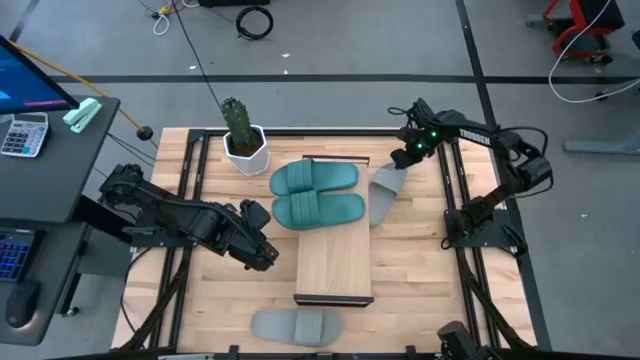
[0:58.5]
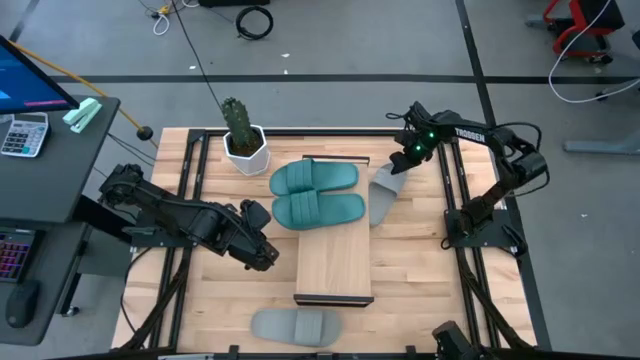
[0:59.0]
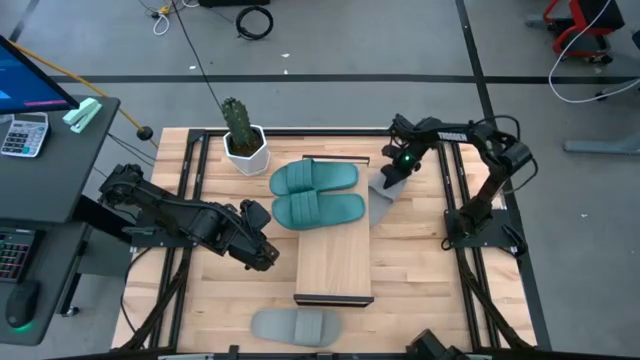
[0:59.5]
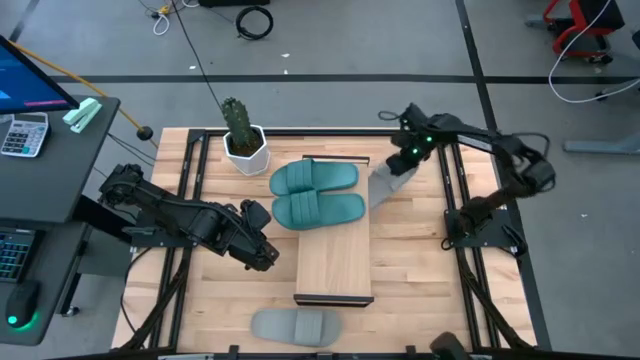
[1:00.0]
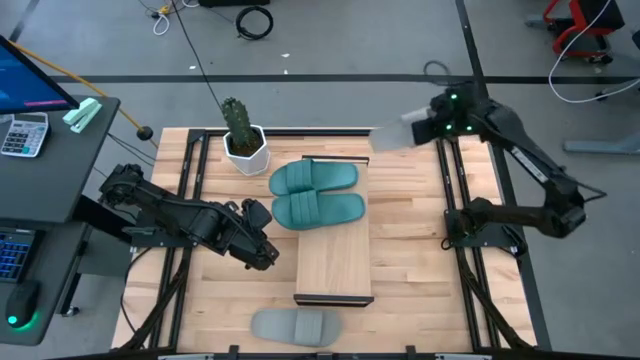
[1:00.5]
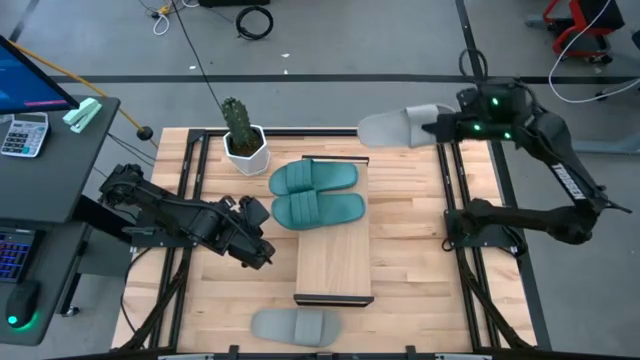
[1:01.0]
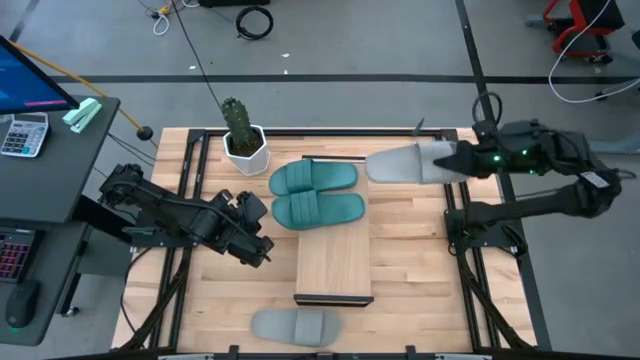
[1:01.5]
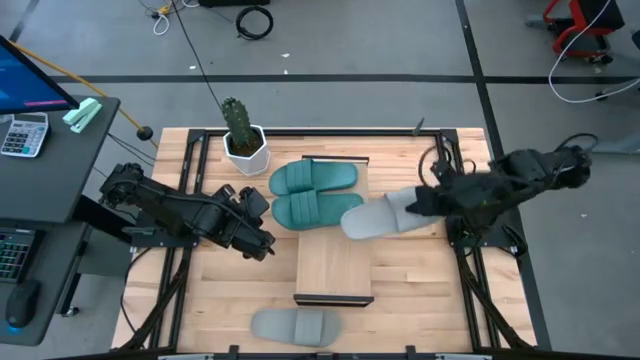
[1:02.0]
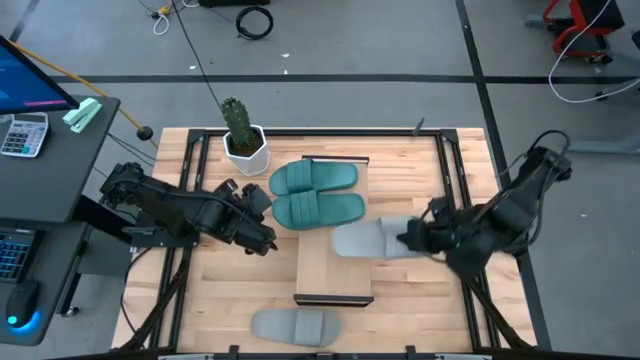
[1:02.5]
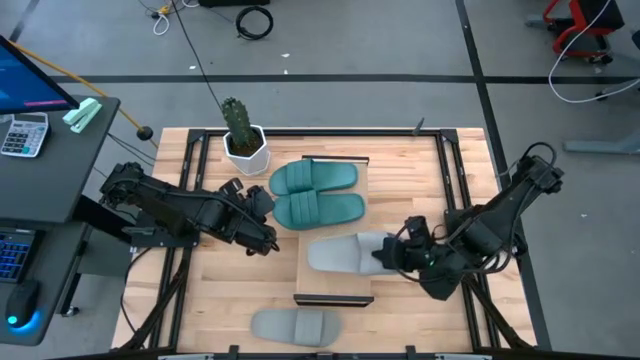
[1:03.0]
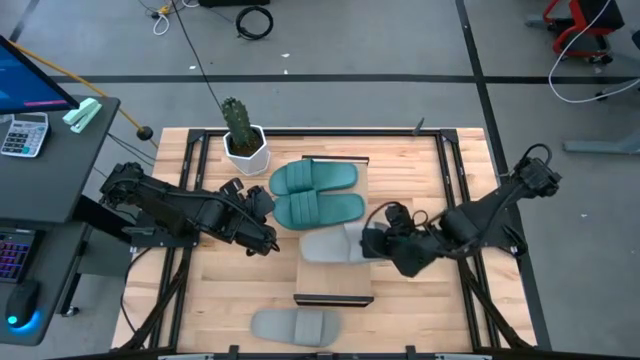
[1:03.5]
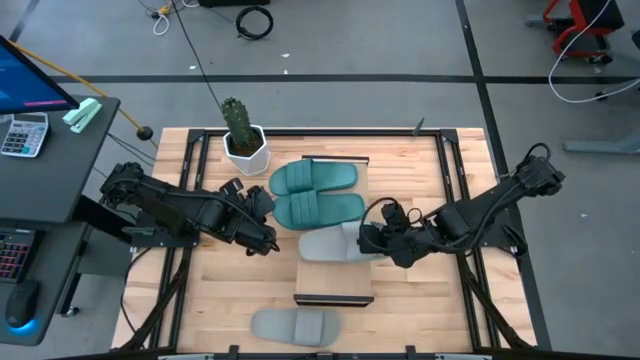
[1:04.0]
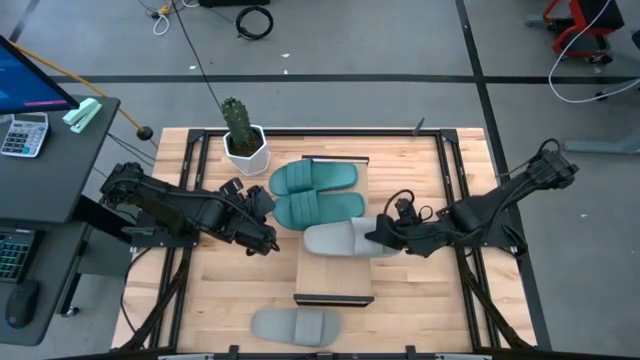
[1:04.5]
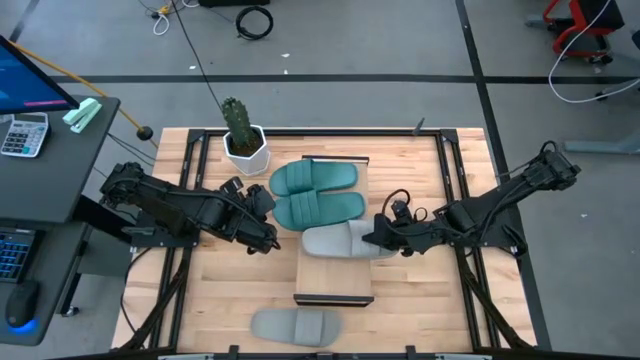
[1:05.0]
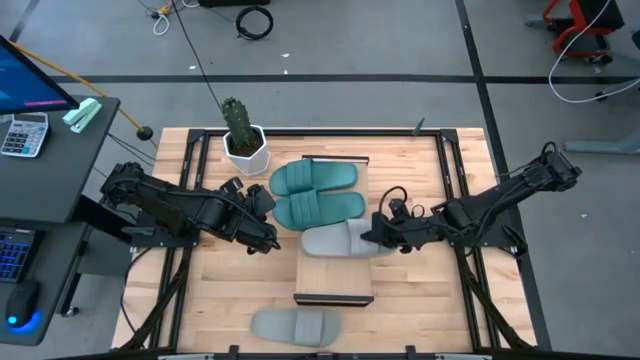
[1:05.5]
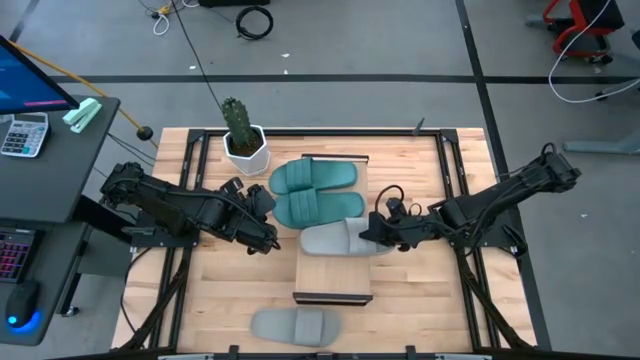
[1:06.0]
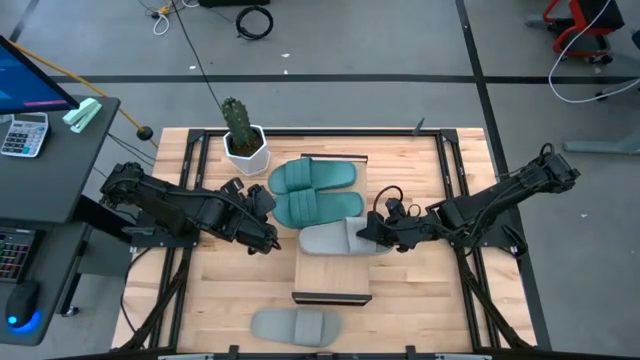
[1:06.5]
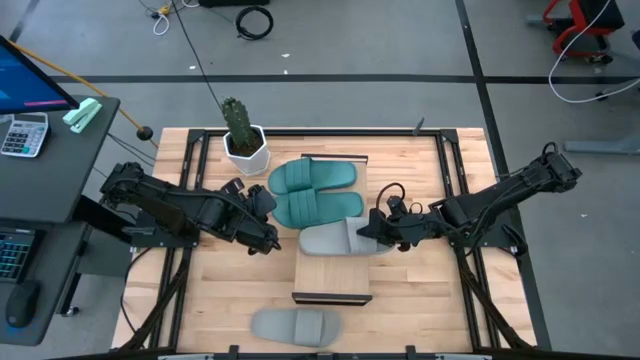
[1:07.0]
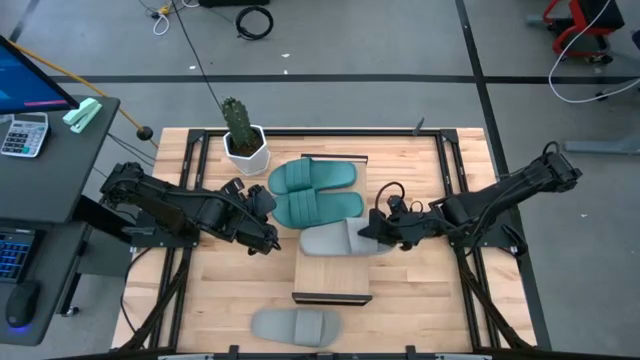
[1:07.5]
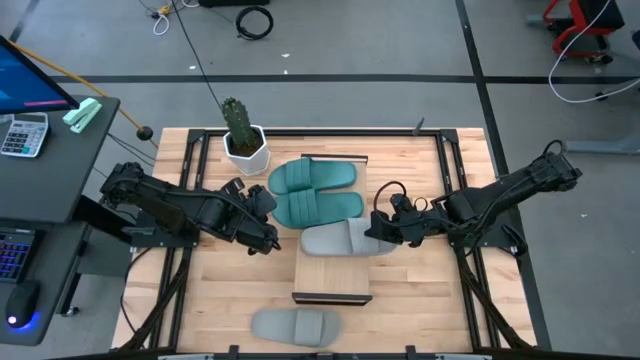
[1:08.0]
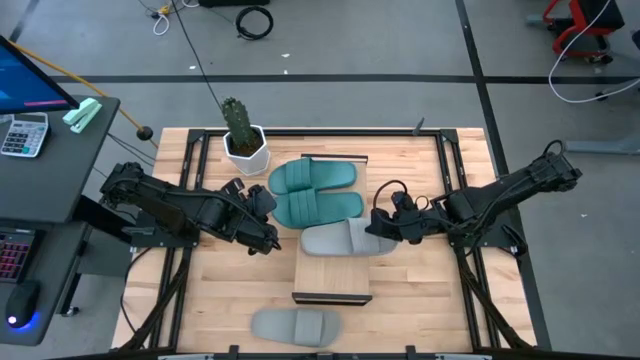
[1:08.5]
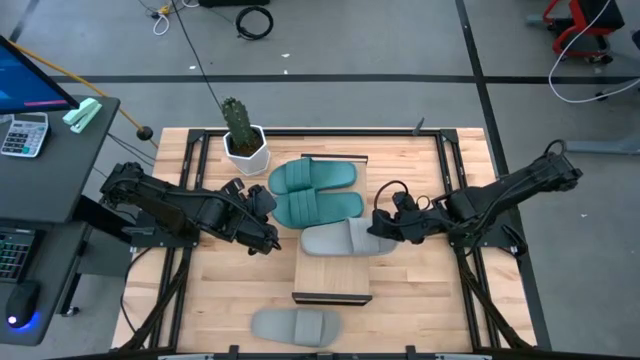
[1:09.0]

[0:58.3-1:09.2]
Task: Pick and place slides into the shelf
Put the top gray slide on the shelf

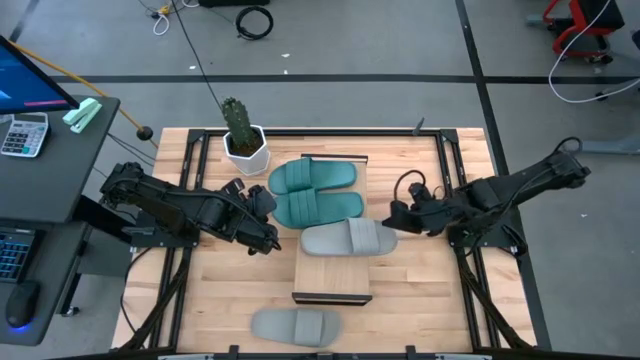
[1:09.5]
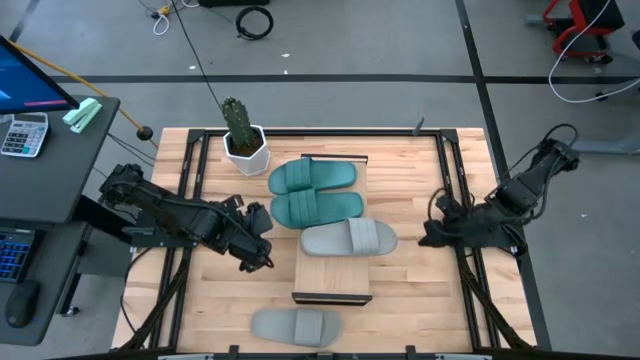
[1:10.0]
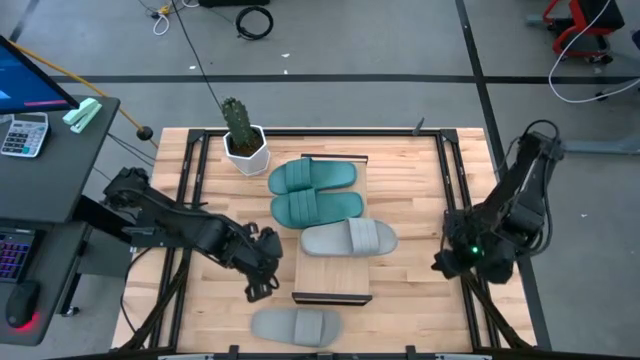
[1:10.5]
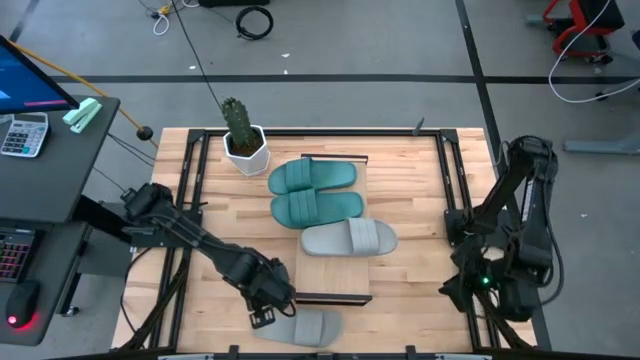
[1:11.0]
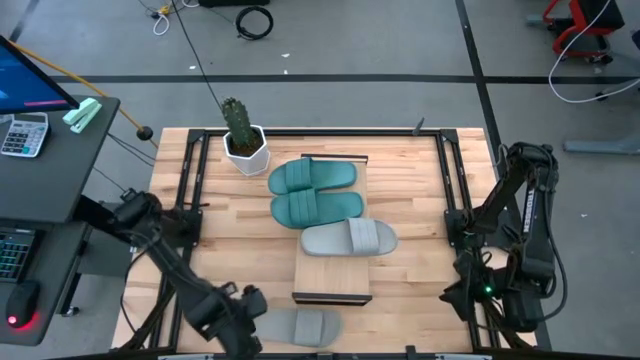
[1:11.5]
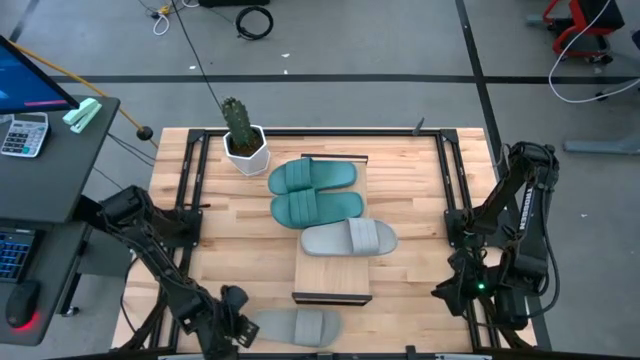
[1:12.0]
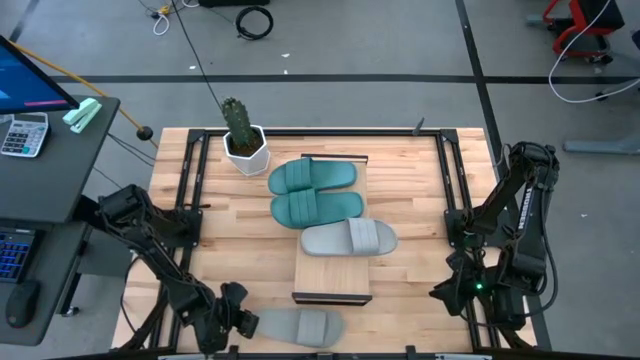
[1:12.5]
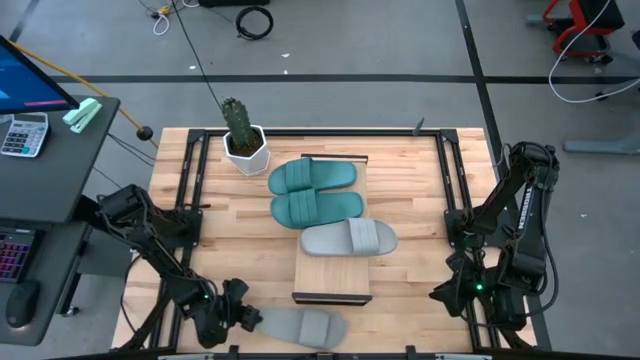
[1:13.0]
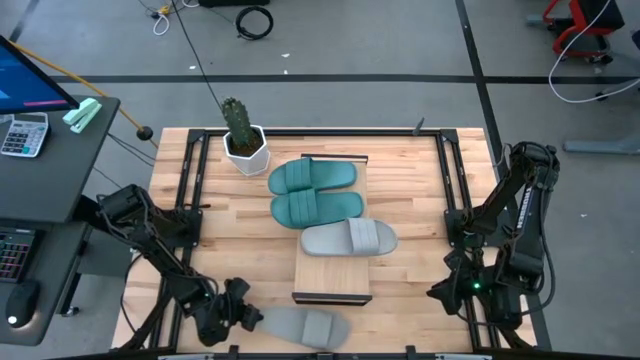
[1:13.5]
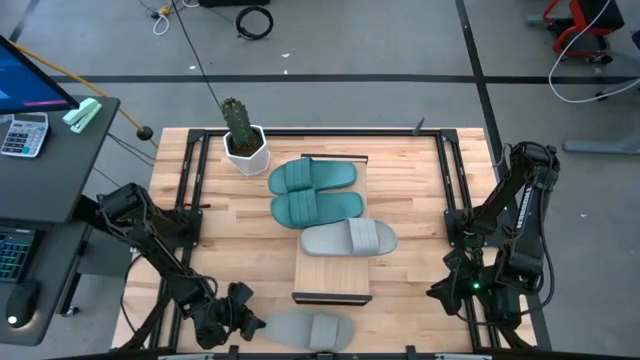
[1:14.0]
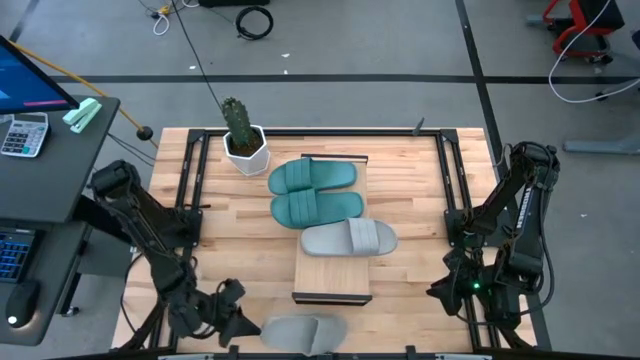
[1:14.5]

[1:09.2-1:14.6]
Put the gray slide on the shelf
